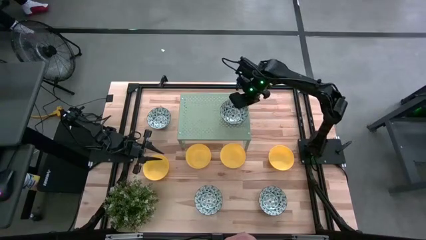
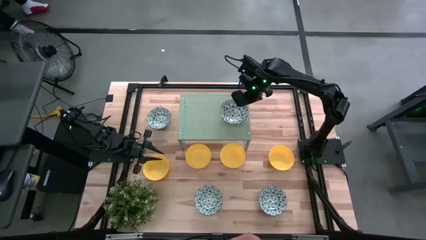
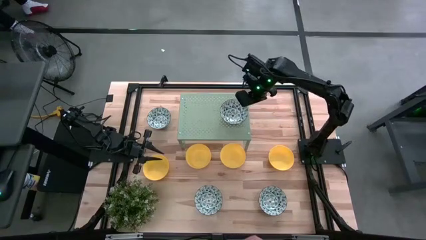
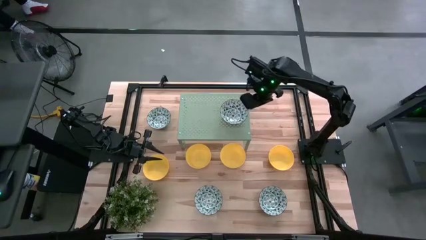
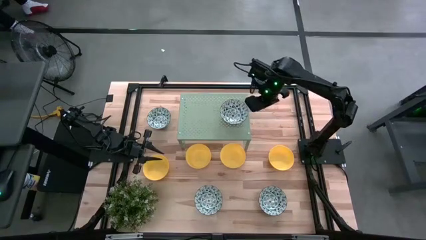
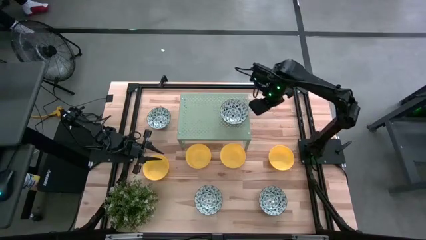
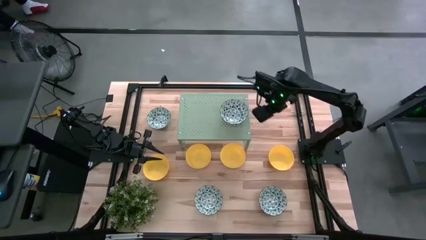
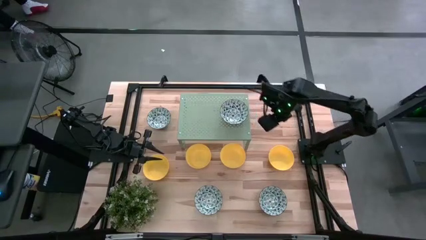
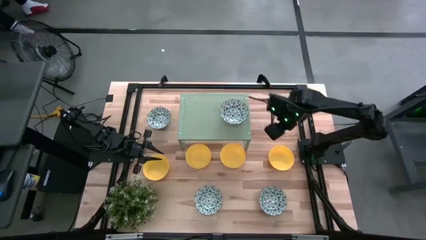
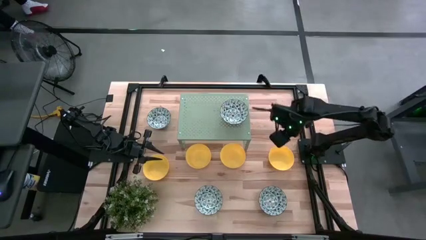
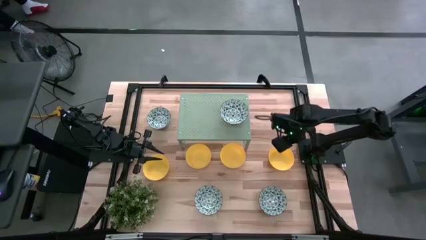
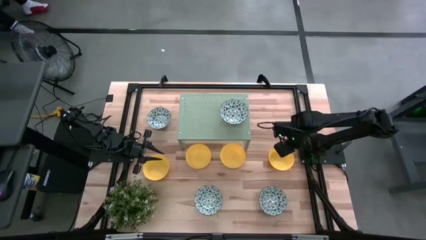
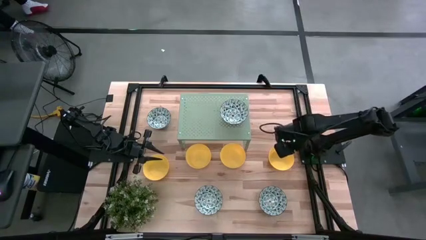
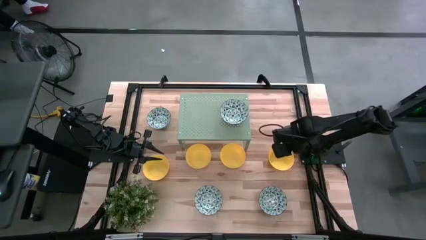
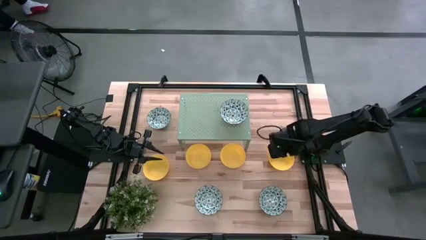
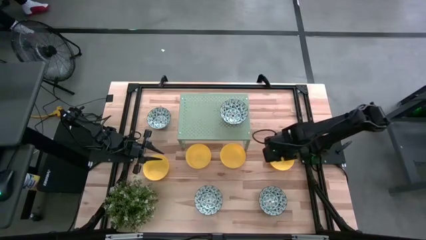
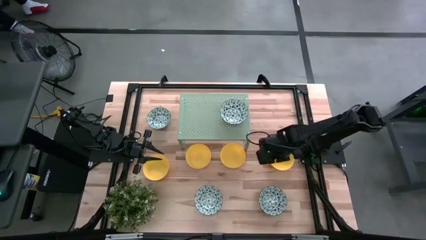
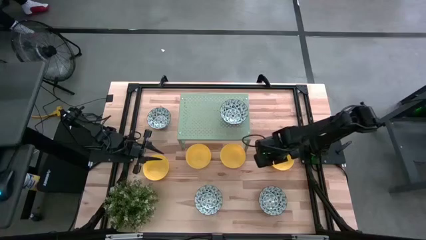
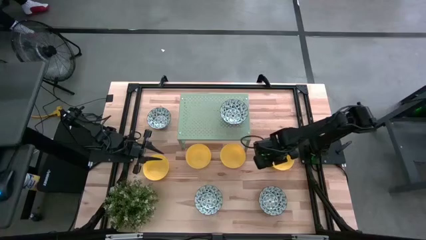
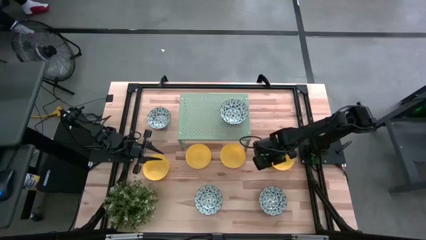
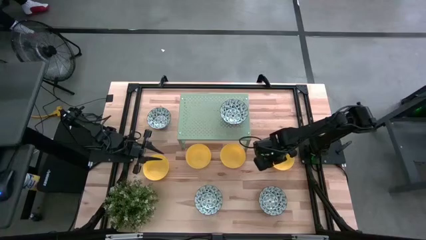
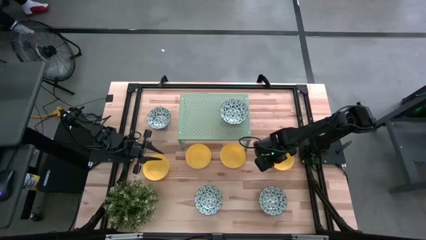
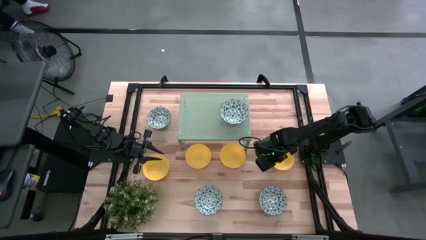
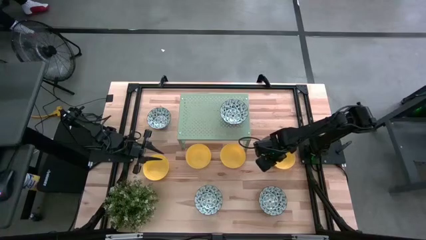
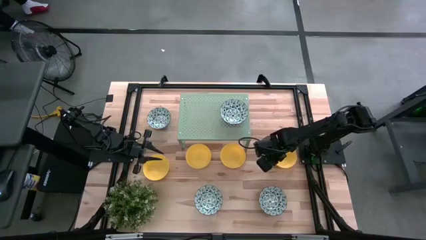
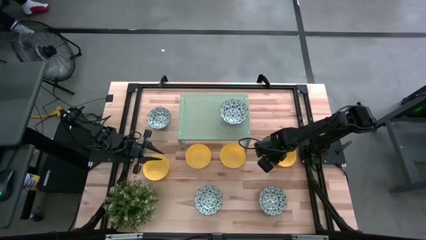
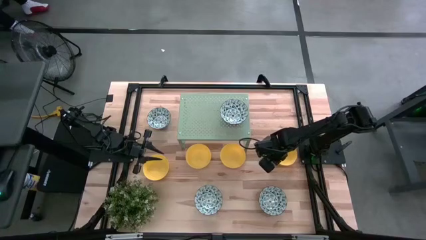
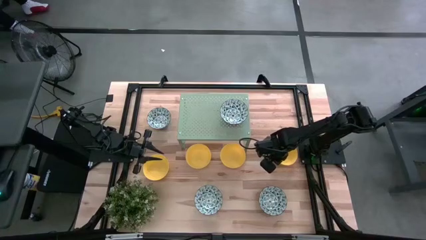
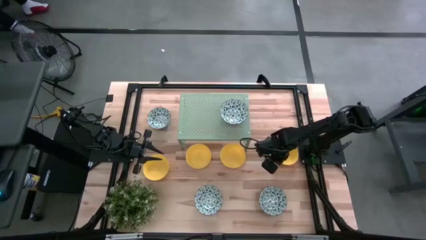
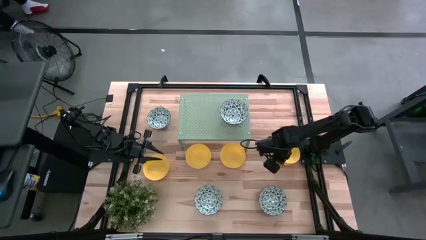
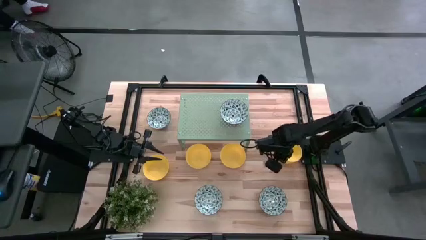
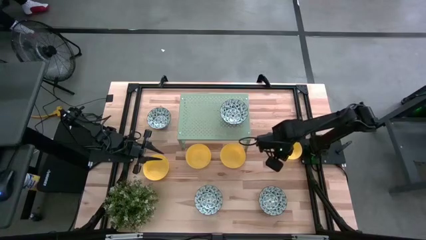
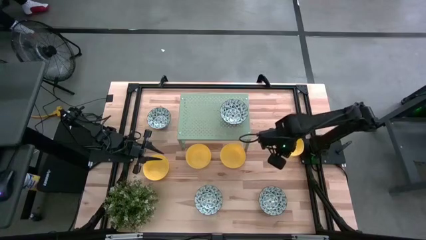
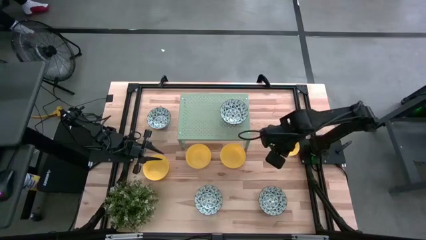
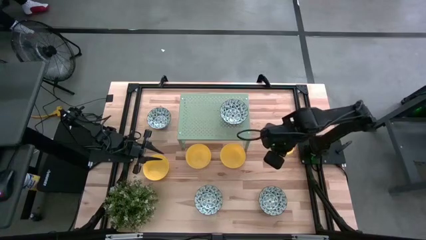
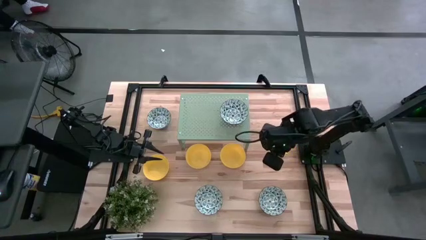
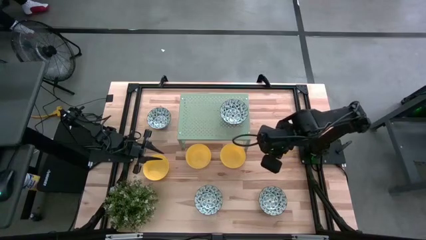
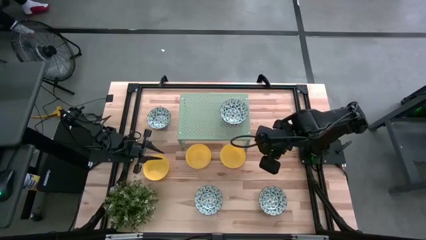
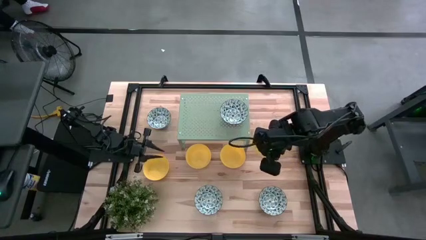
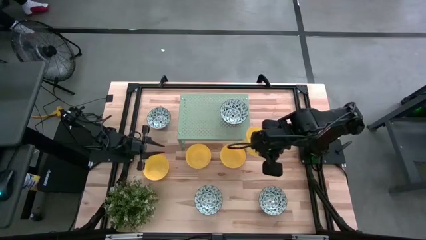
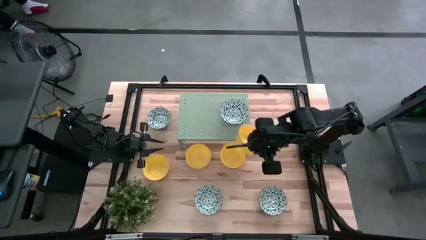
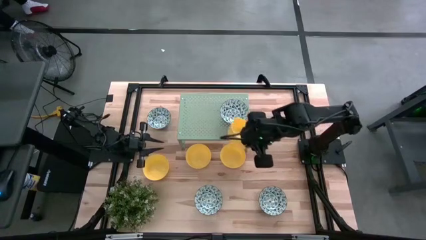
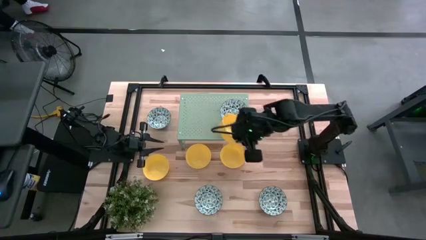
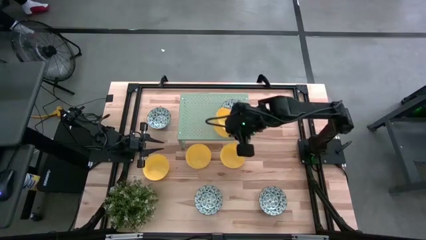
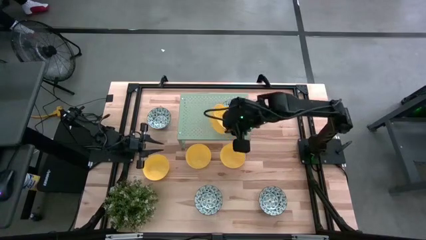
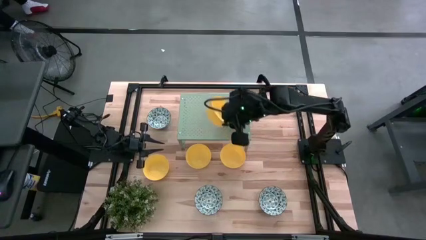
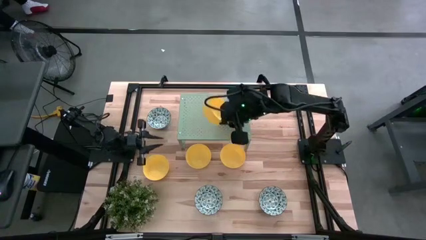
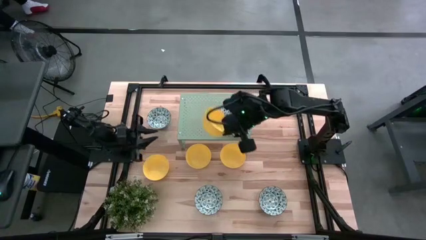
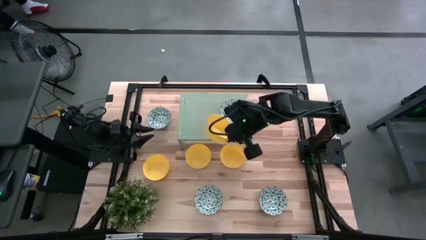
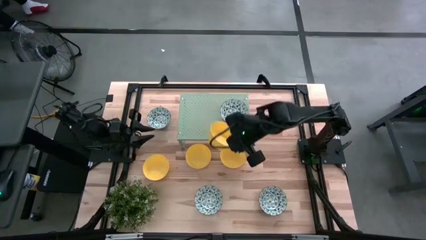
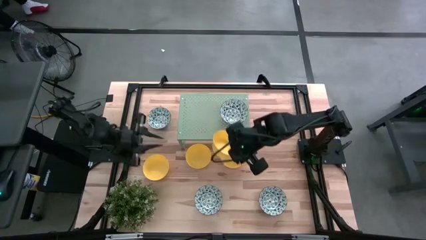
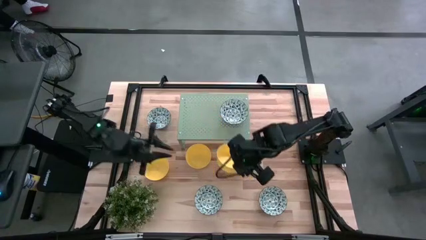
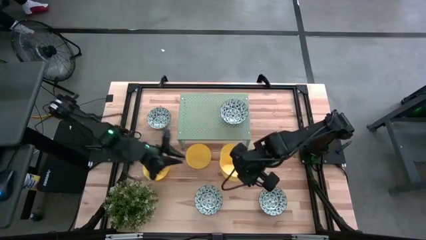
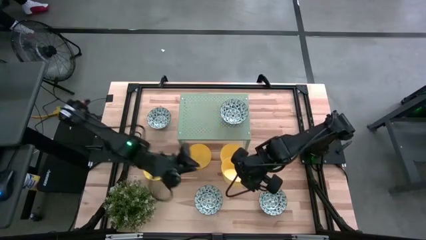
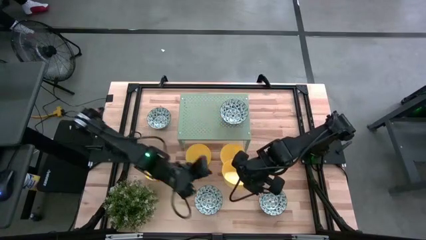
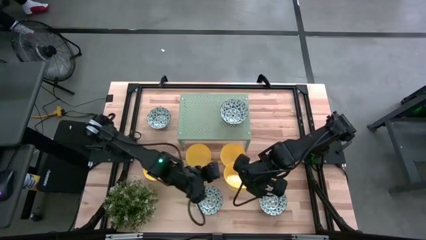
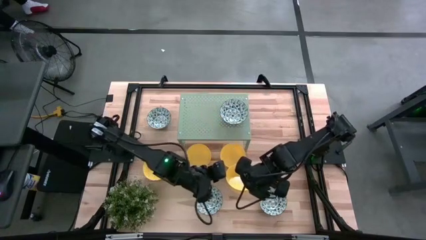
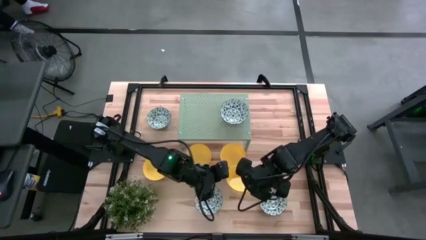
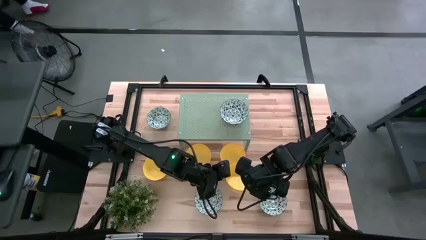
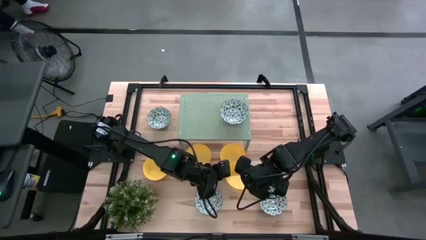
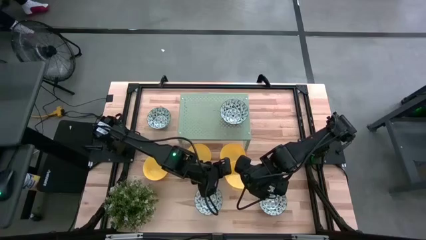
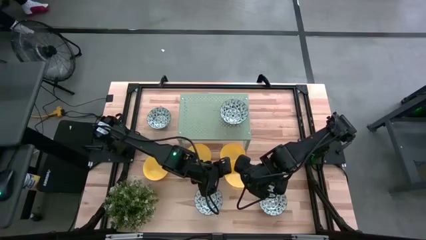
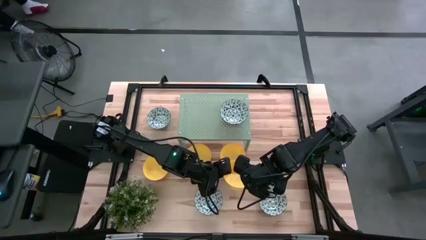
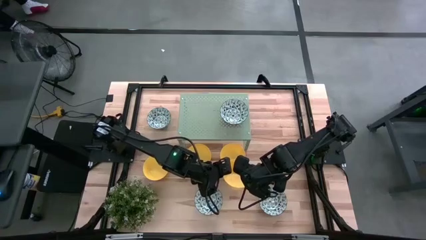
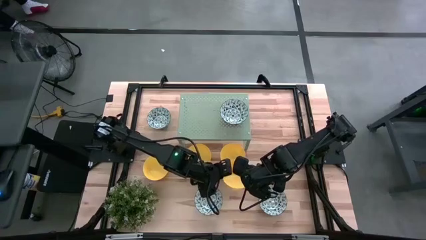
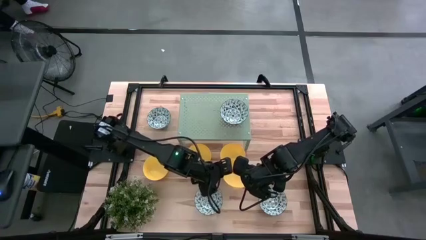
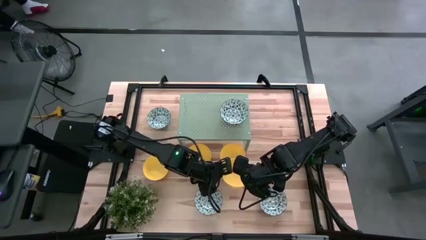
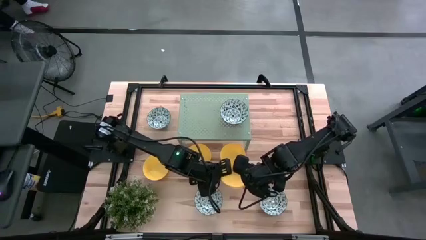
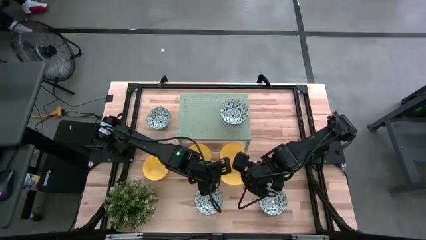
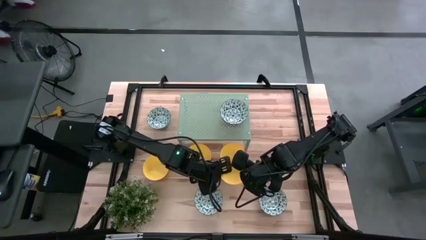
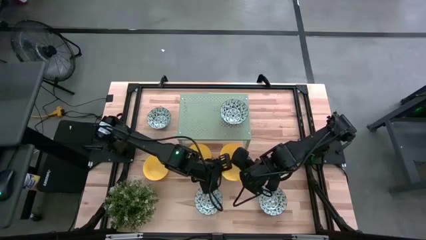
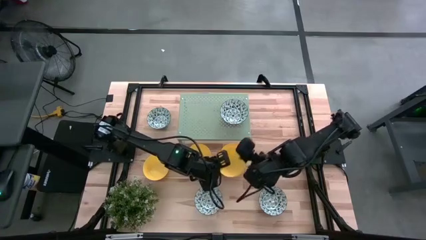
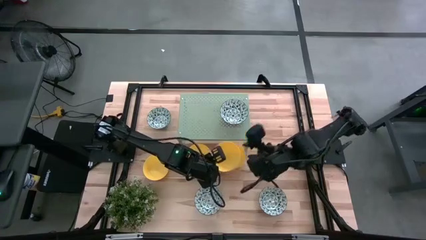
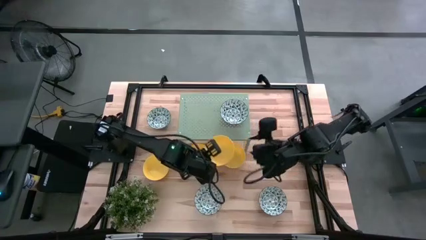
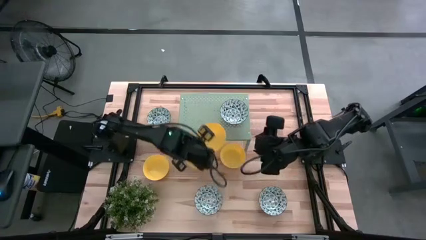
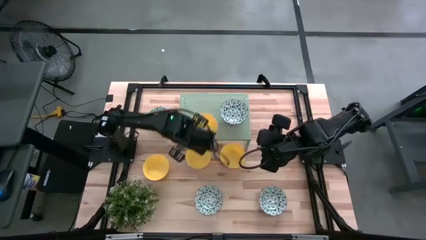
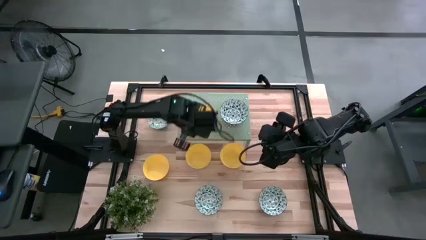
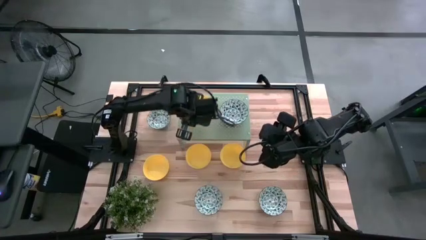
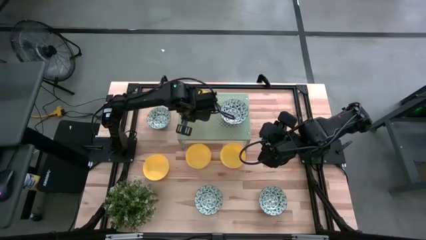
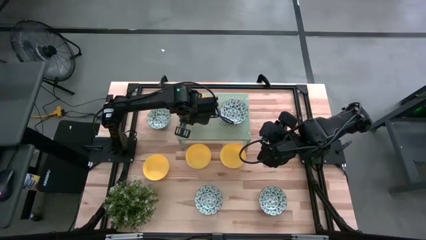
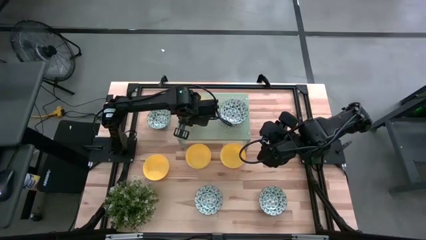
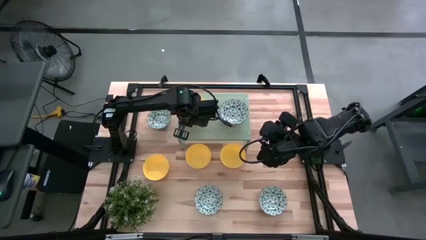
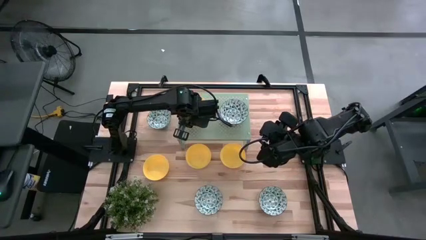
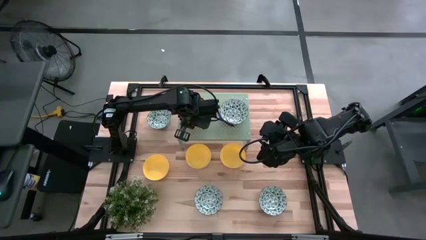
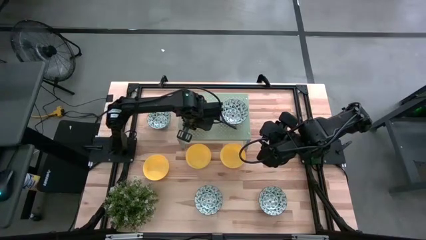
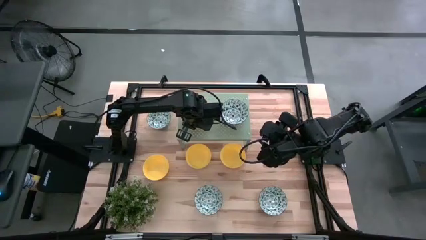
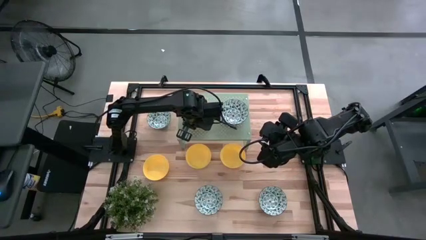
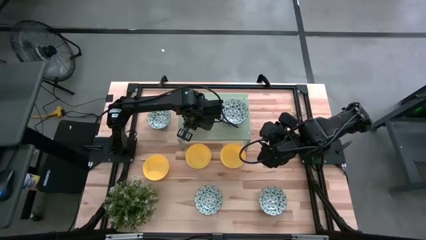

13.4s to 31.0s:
Task: Pick & Place Mini bowls
Put the yellow bowl on the shelf
